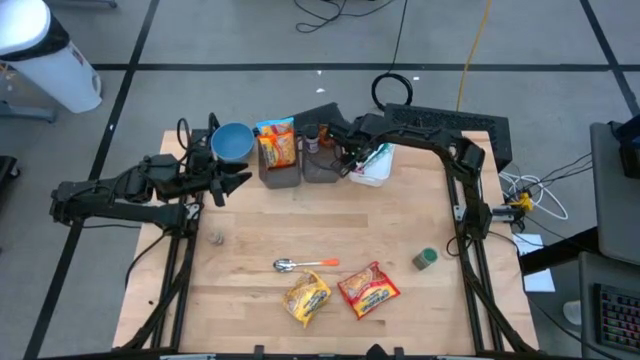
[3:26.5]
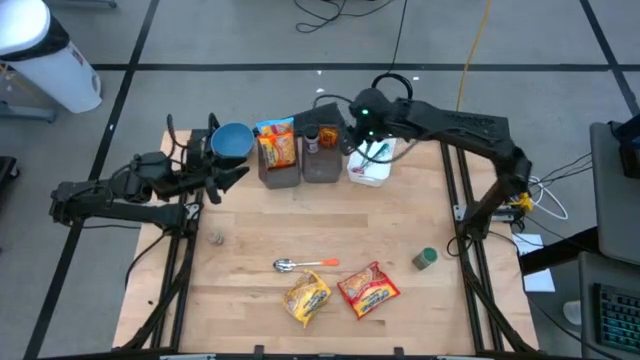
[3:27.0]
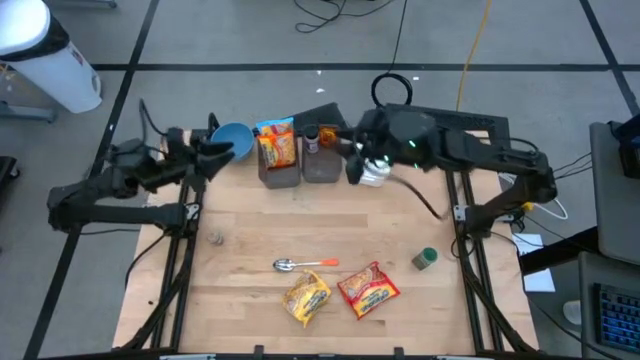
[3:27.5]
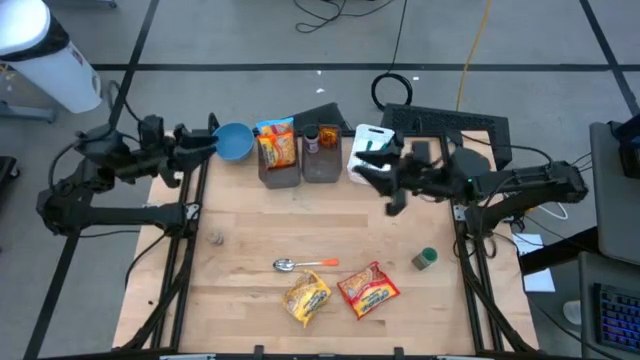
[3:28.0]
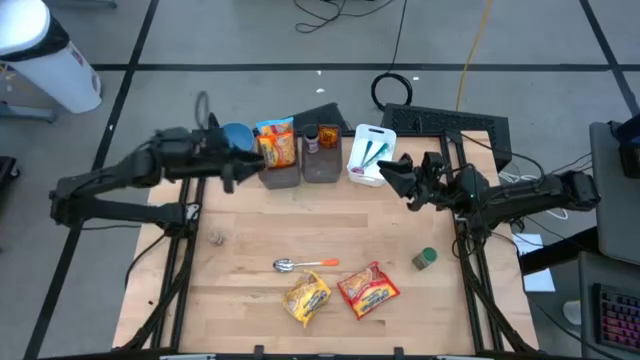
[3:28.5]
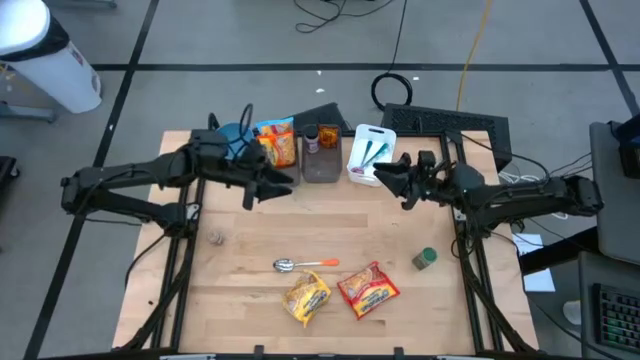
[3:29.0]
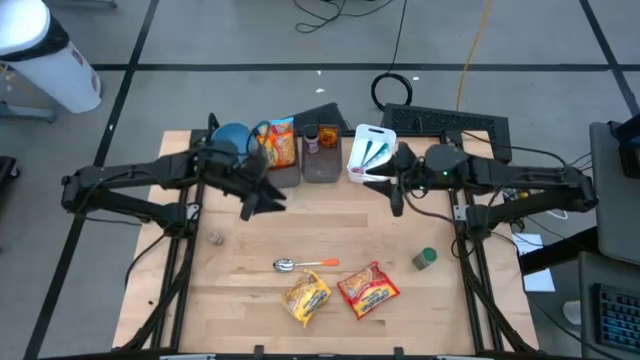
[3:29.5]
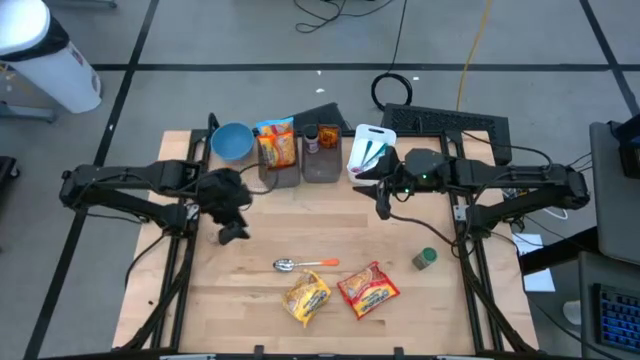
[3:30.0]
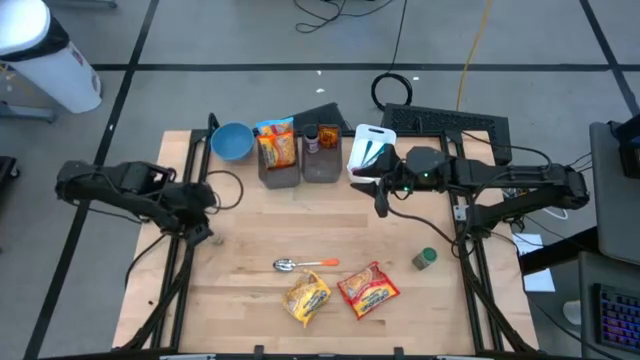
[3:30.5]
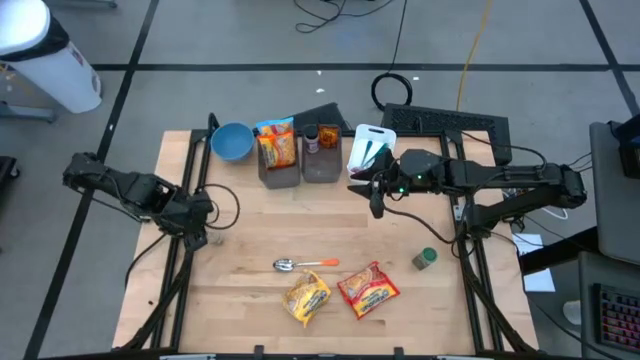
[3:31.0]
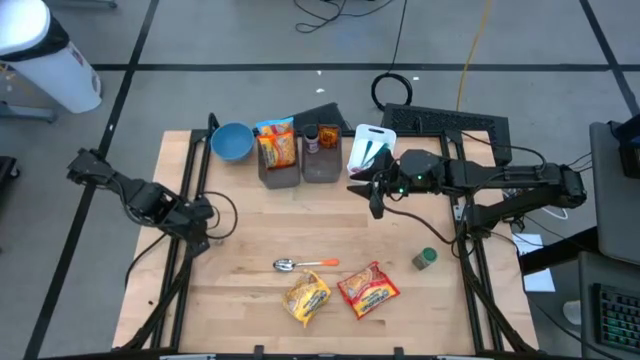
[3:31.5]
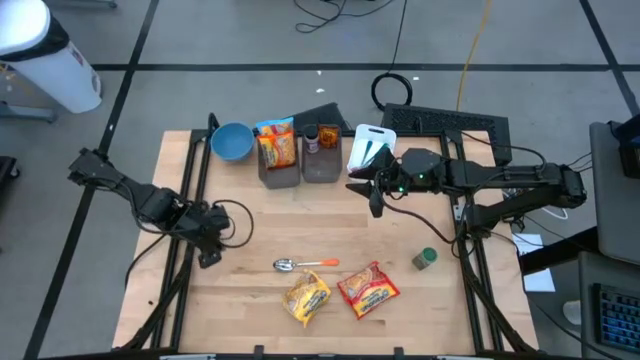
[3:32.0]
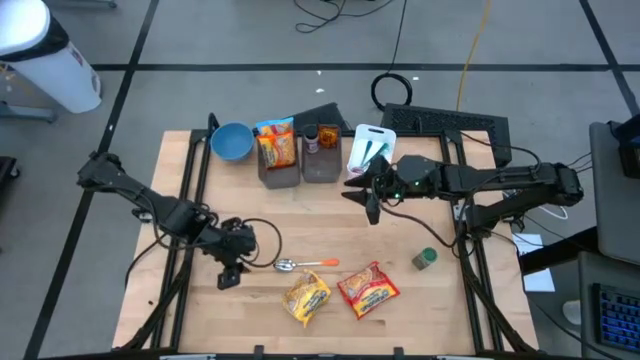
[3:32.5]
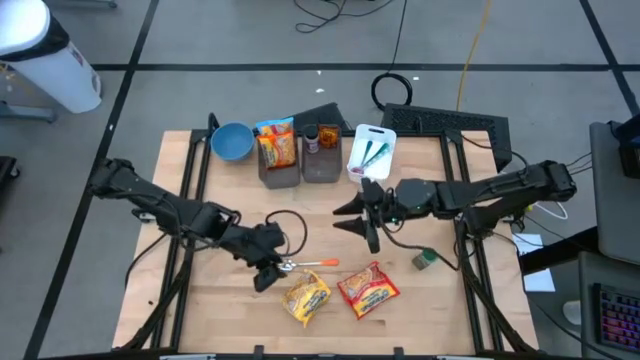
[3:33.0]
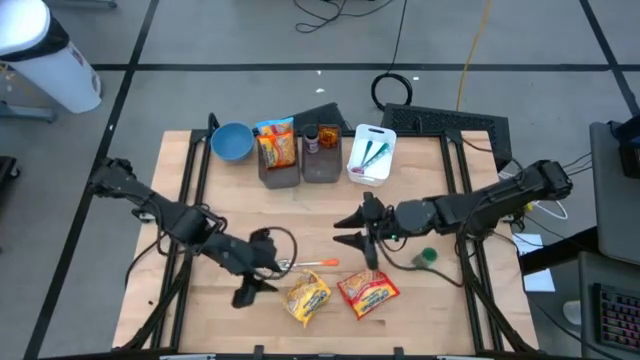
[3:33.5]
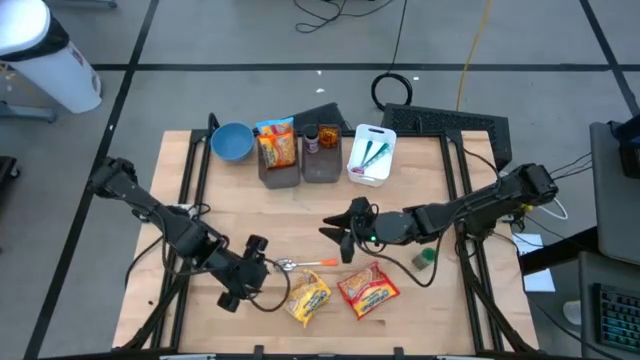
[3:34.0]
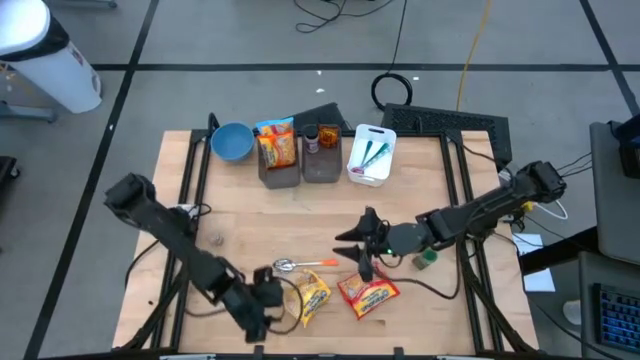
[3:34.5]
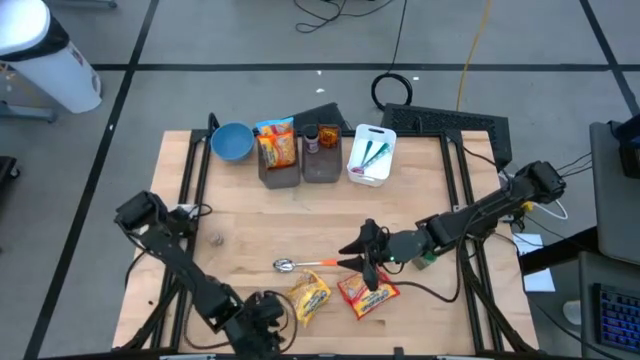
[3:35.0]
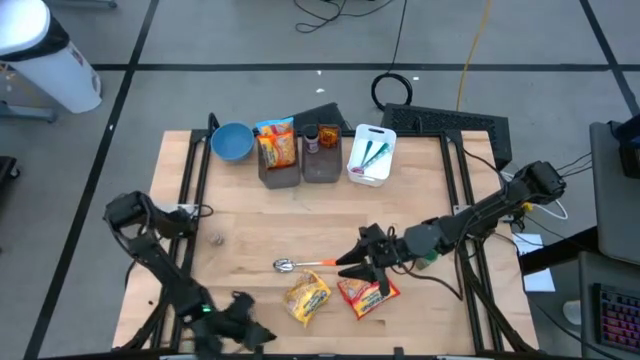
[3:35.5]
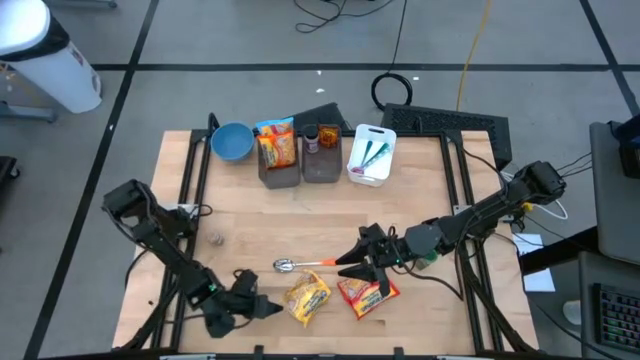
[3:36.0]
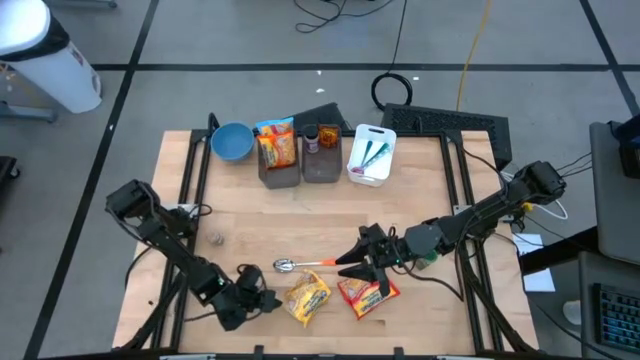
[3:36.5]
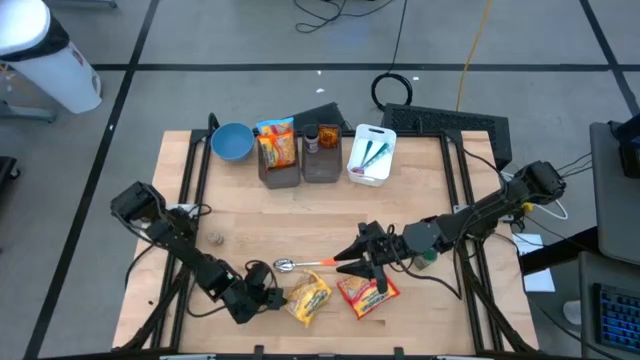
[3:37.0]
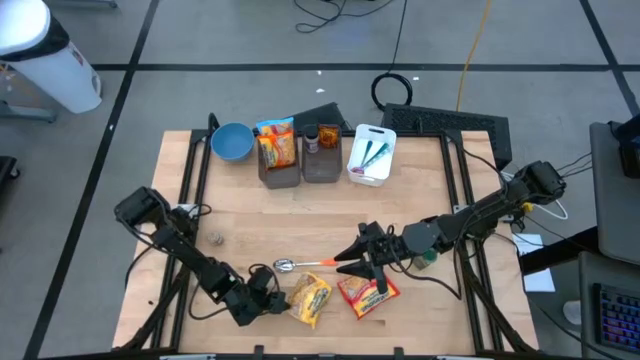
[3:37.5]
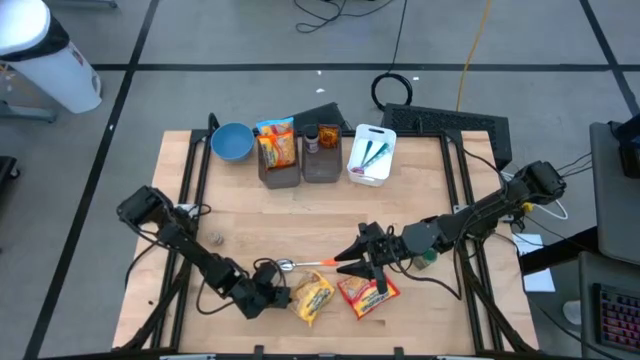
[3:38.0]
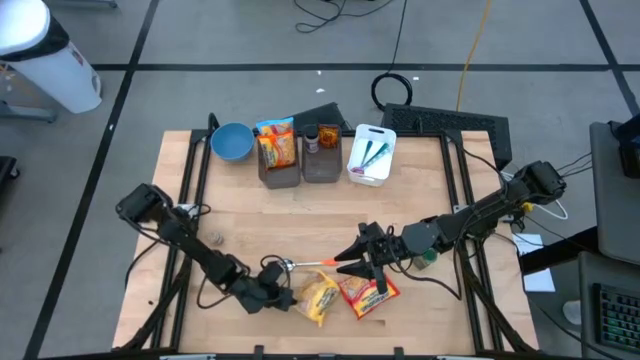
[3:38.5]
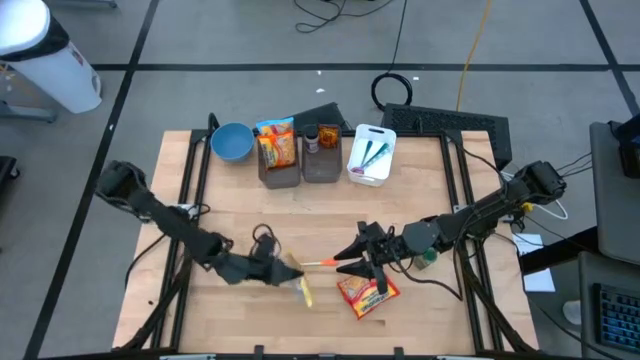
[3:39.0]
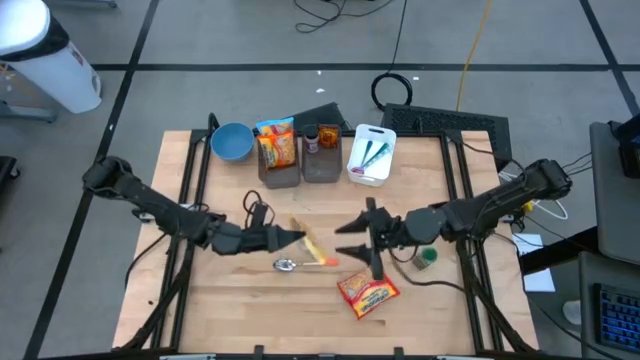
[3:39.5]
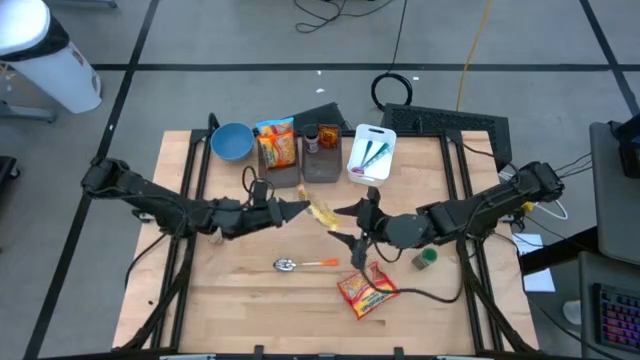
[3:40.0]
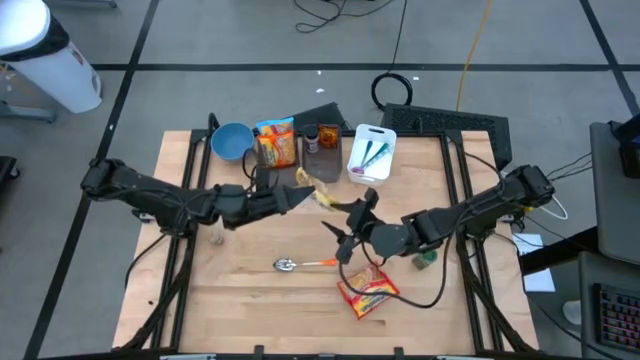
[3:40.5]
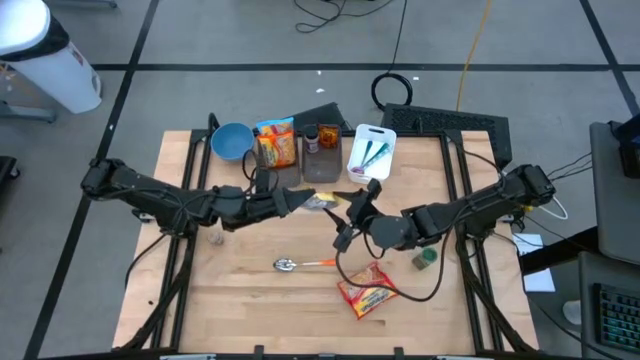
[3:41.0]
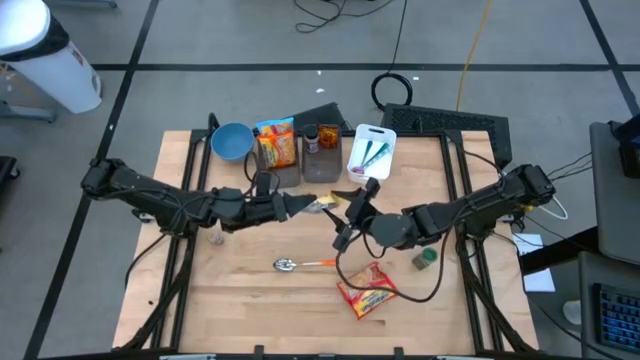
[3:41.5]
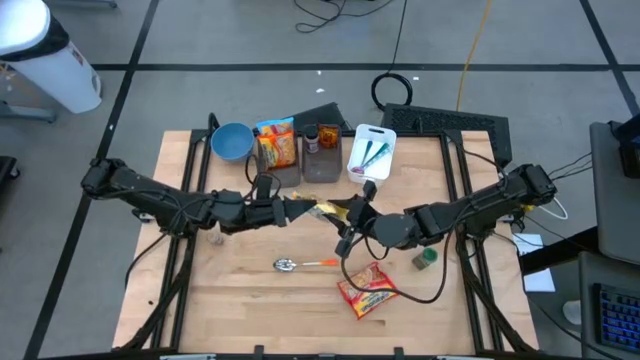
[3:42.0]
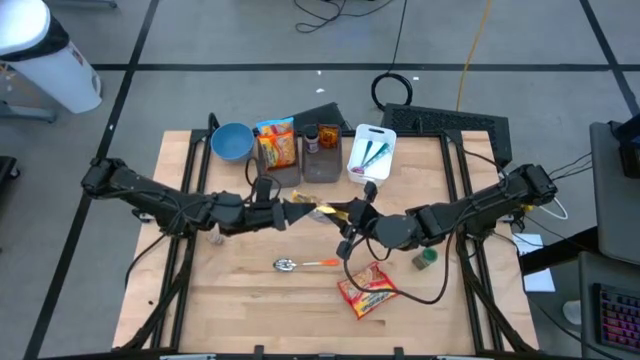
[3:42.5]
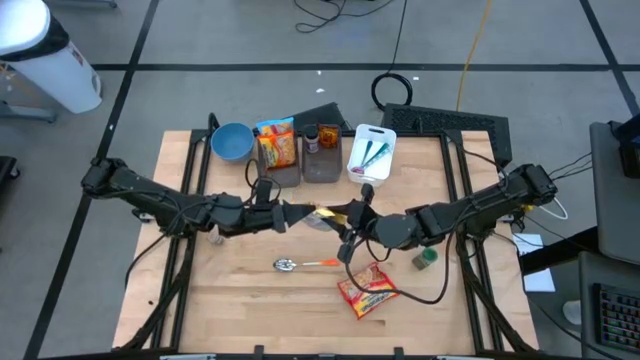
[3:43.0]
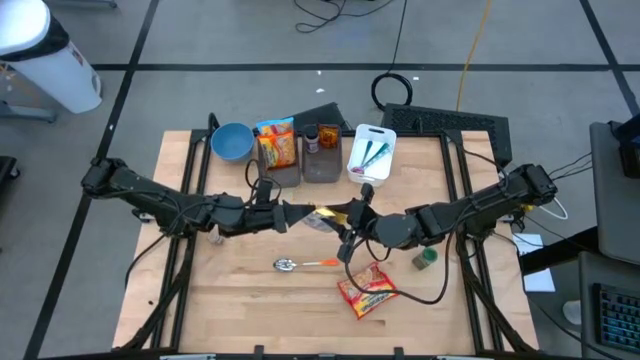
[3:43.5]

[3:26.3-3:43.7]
Task: Pick & Place Food Item
Put the yellow noodle pack into the left black bin

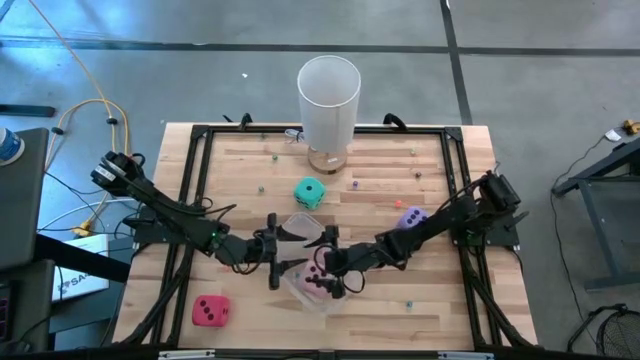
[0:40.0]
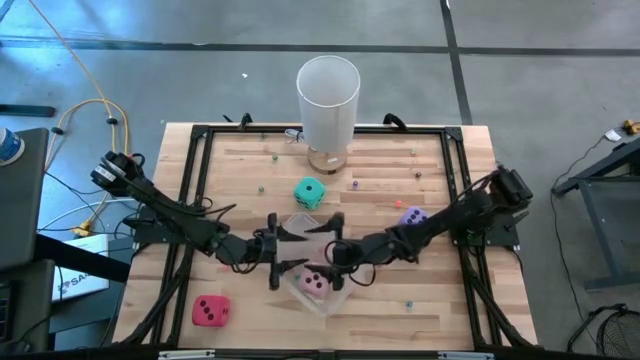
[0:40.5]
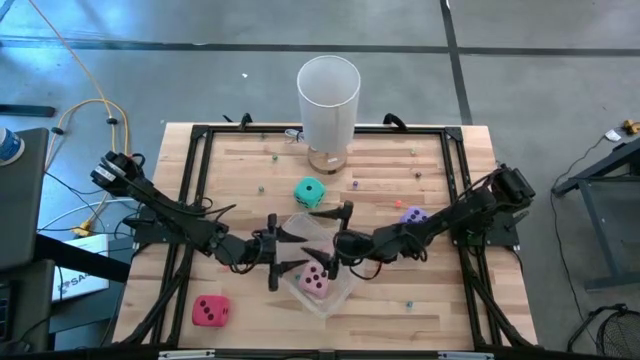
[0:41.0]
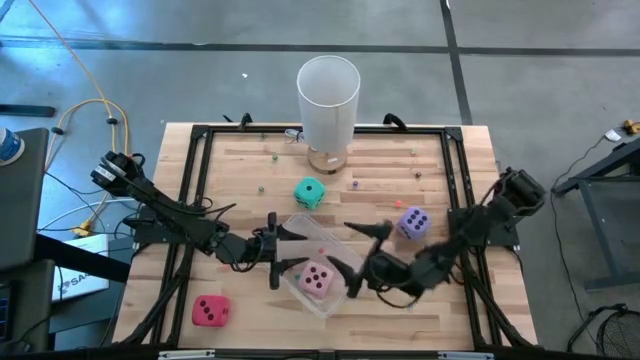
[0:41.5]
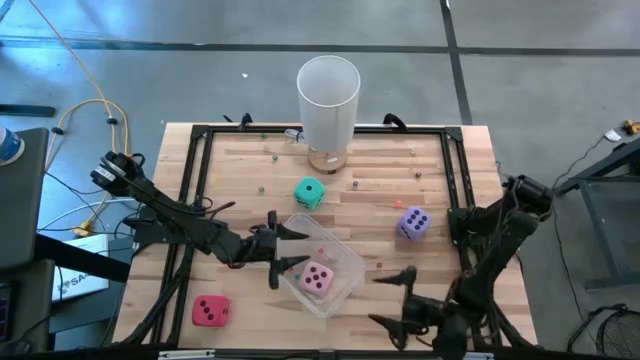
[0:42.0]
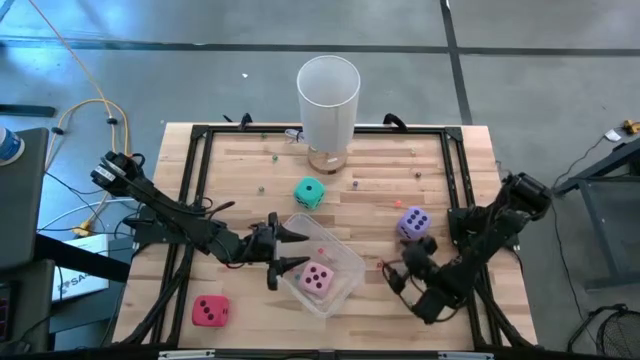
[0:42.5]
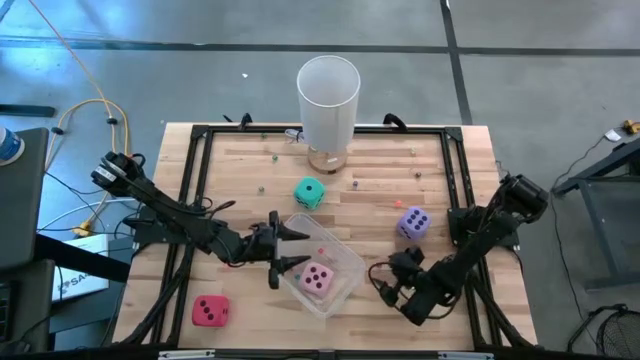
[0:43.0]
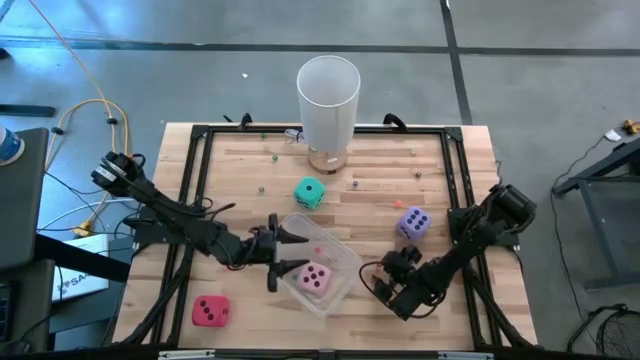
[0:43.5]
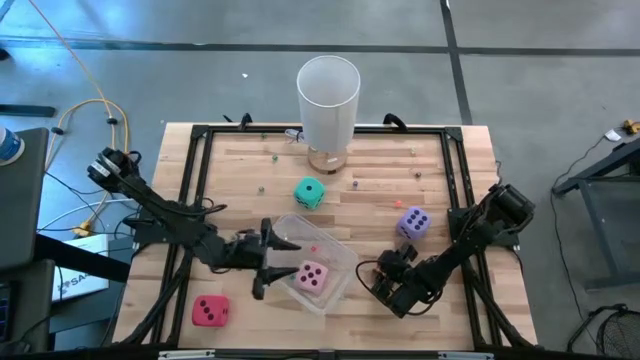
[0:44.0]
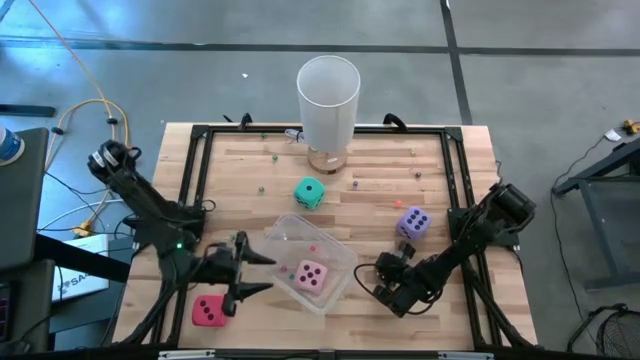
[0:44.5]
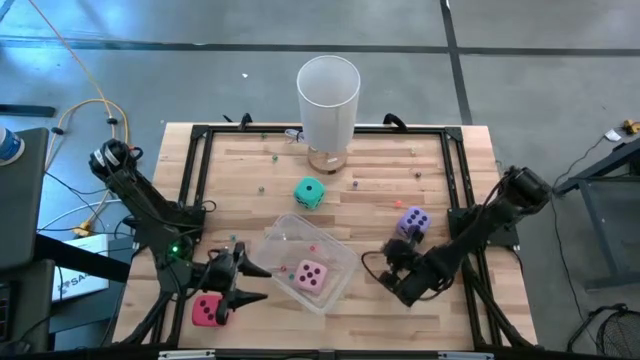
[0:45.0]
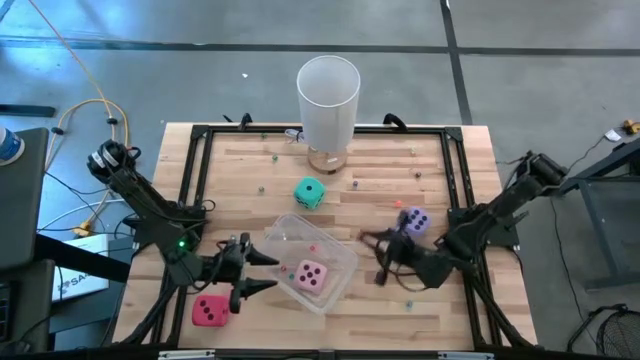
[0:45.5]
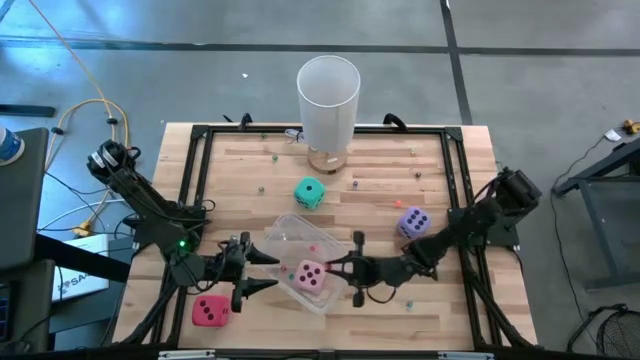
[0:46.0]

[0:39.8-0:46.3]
Task: Pick & Place Dice
Put the small red dice into transparent bin
